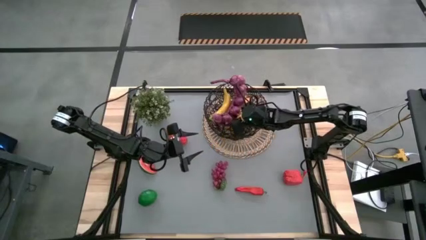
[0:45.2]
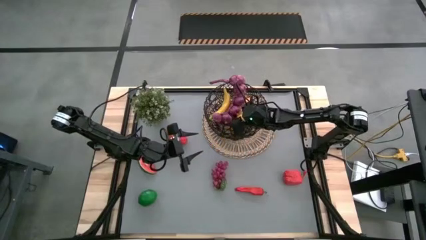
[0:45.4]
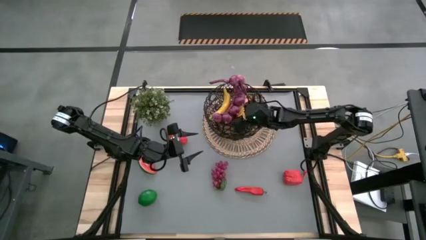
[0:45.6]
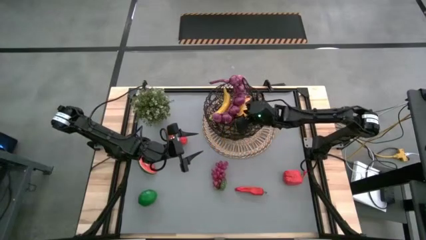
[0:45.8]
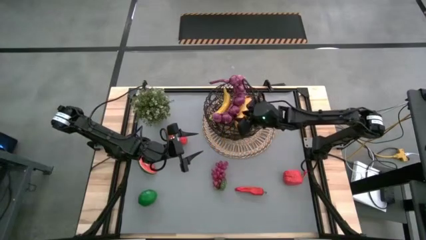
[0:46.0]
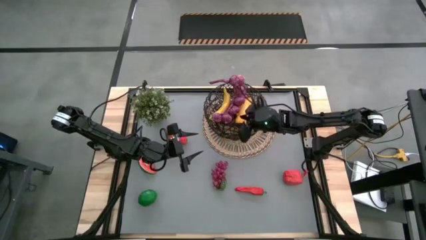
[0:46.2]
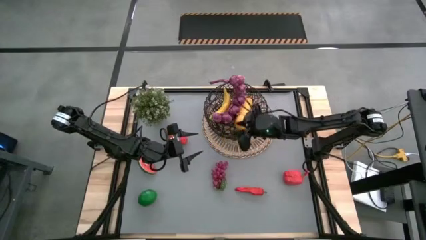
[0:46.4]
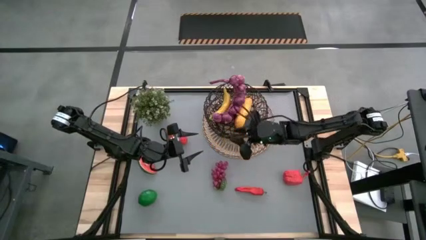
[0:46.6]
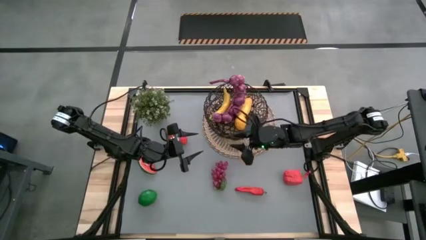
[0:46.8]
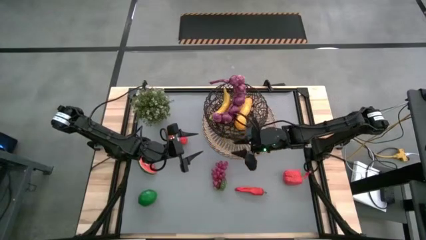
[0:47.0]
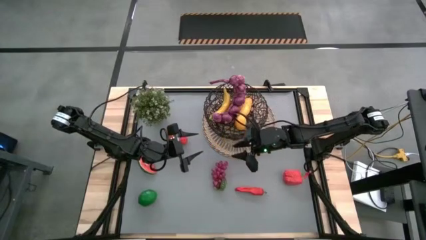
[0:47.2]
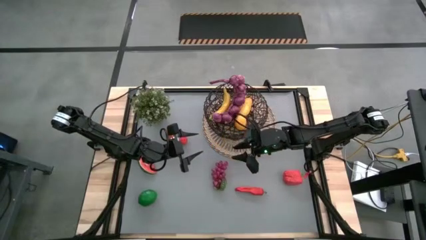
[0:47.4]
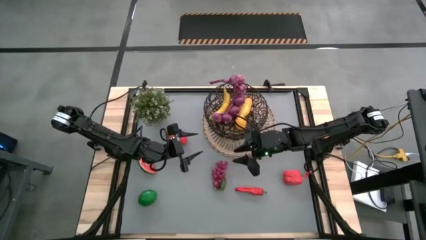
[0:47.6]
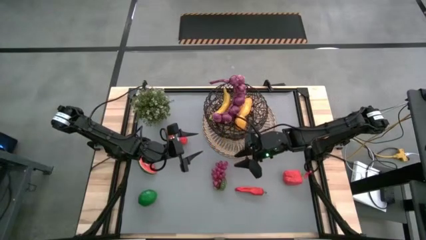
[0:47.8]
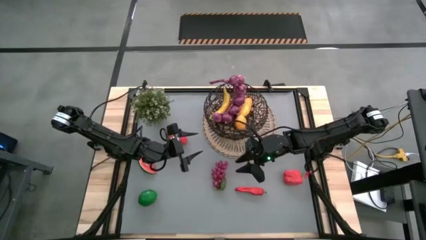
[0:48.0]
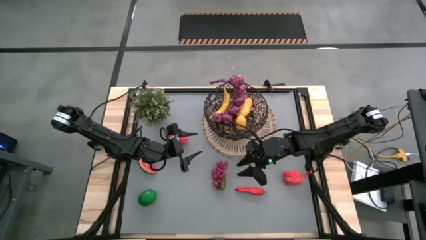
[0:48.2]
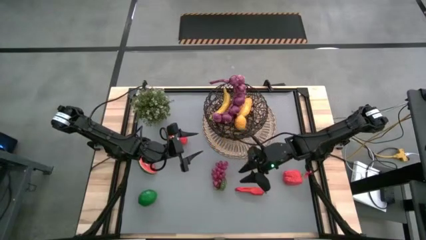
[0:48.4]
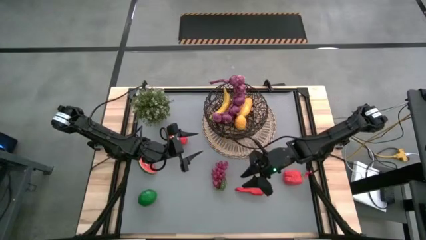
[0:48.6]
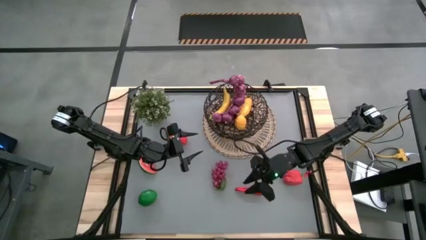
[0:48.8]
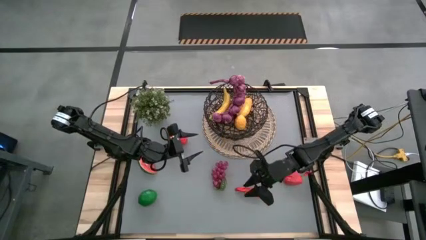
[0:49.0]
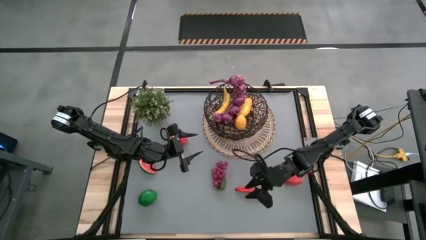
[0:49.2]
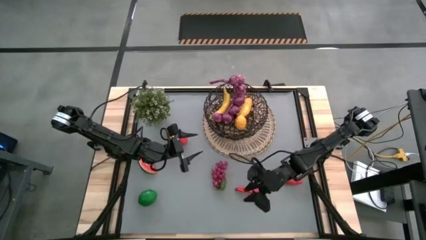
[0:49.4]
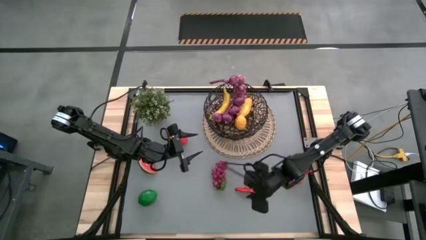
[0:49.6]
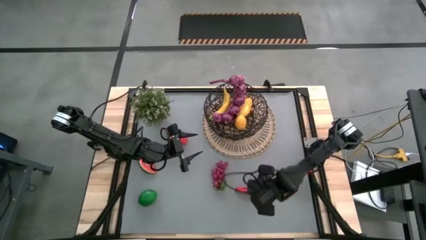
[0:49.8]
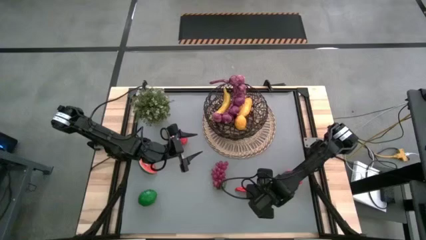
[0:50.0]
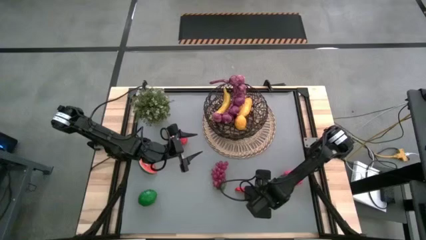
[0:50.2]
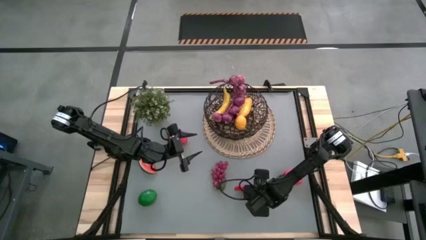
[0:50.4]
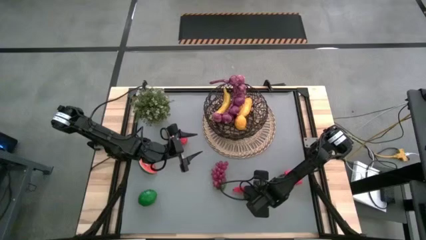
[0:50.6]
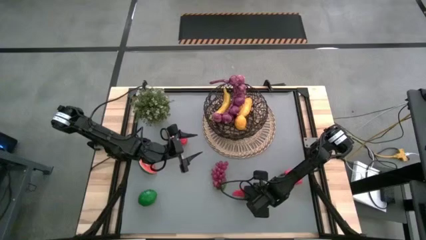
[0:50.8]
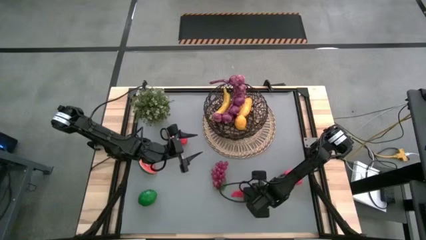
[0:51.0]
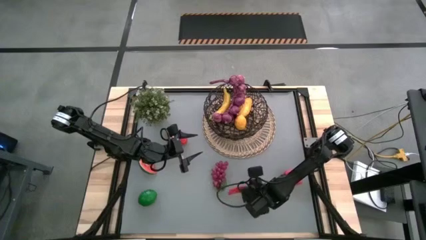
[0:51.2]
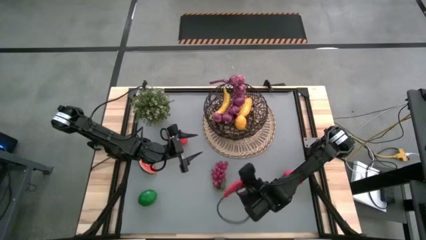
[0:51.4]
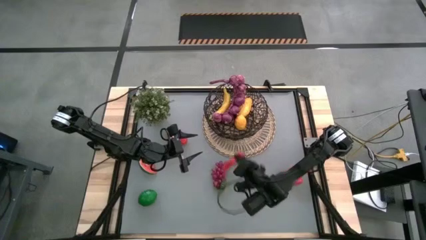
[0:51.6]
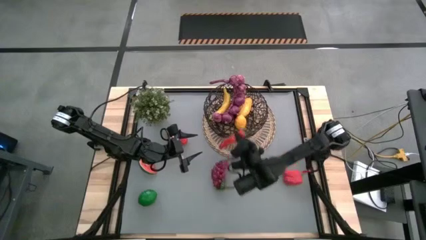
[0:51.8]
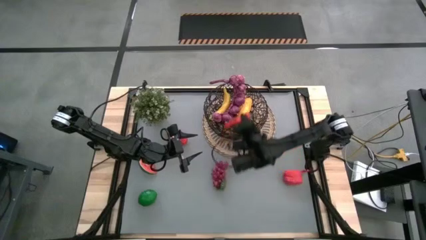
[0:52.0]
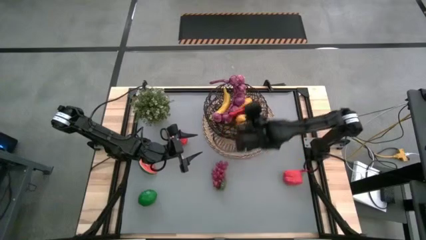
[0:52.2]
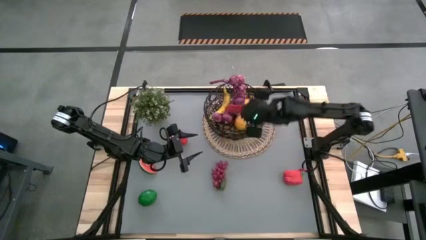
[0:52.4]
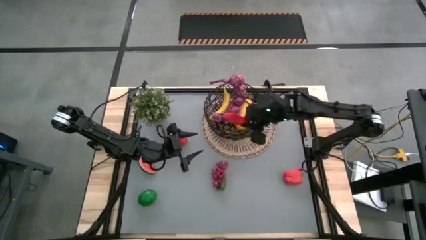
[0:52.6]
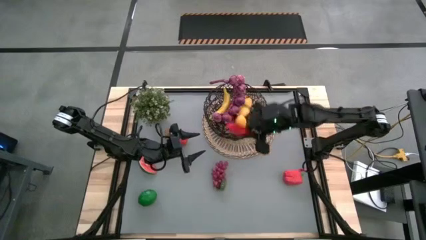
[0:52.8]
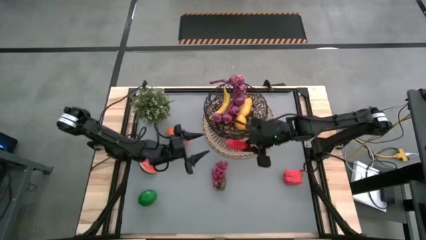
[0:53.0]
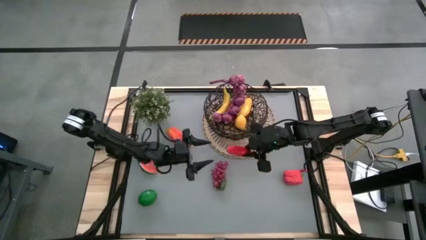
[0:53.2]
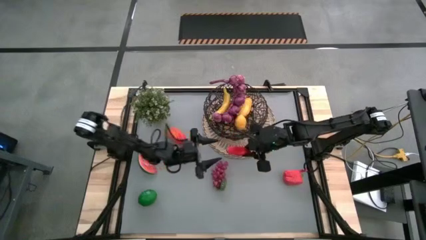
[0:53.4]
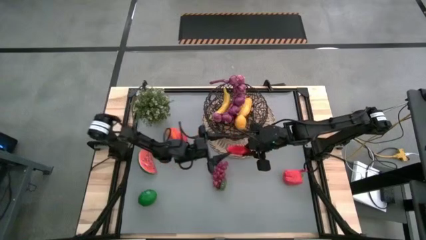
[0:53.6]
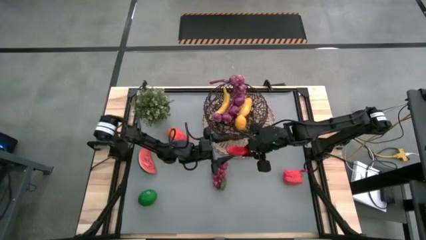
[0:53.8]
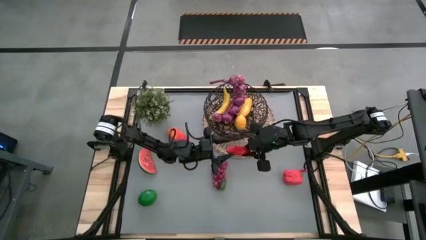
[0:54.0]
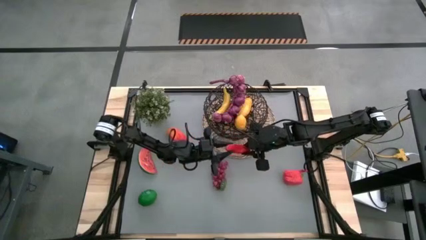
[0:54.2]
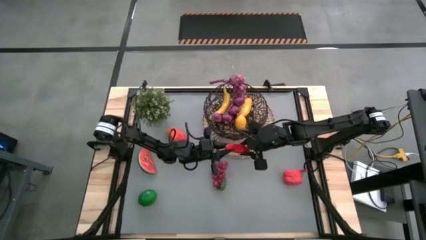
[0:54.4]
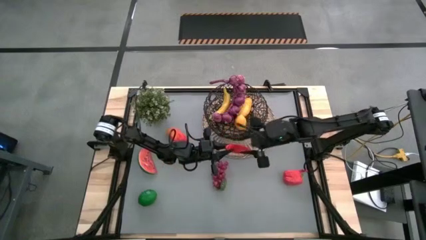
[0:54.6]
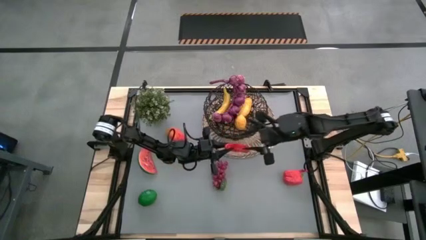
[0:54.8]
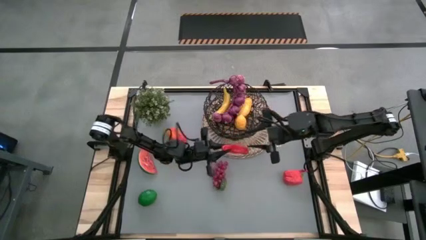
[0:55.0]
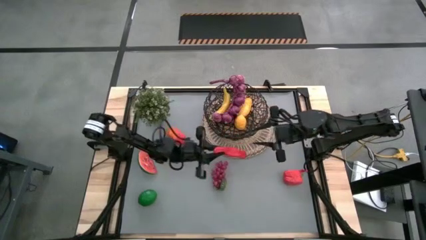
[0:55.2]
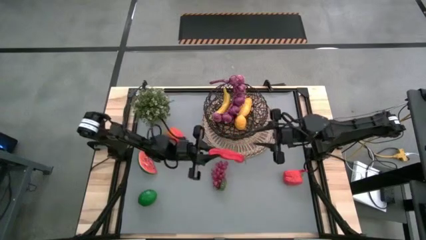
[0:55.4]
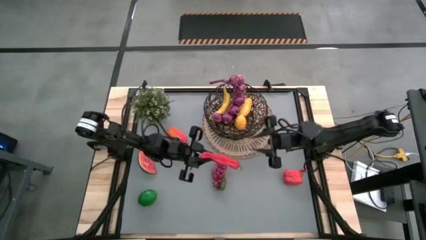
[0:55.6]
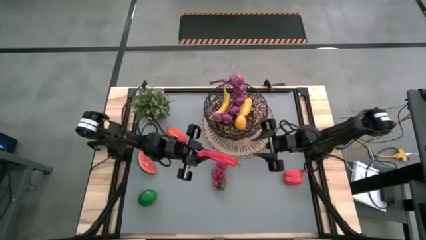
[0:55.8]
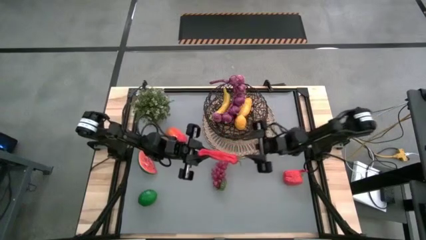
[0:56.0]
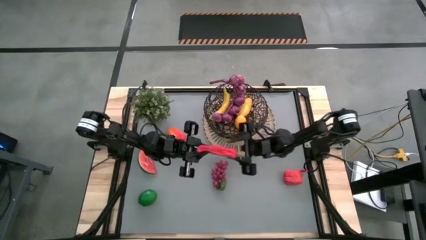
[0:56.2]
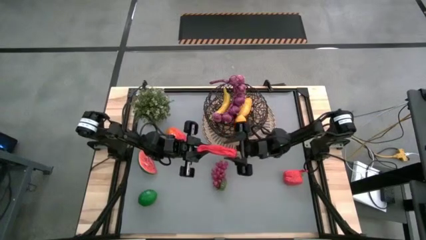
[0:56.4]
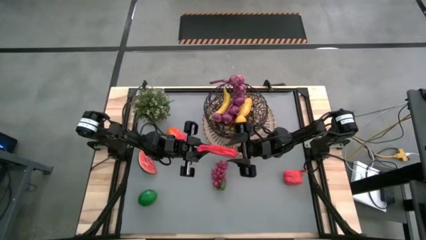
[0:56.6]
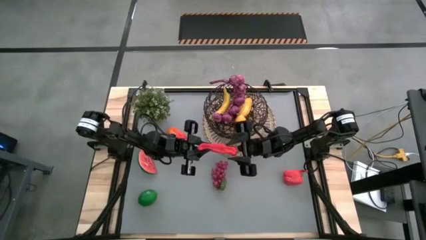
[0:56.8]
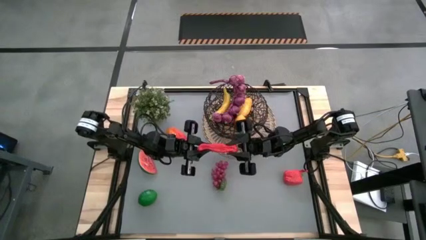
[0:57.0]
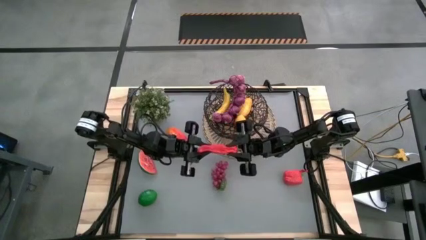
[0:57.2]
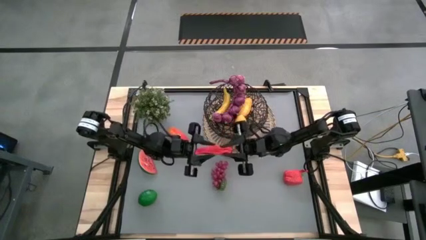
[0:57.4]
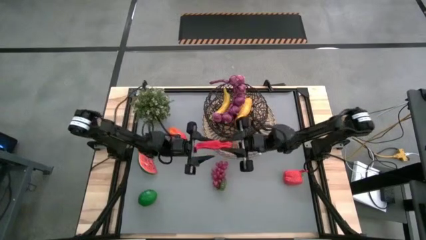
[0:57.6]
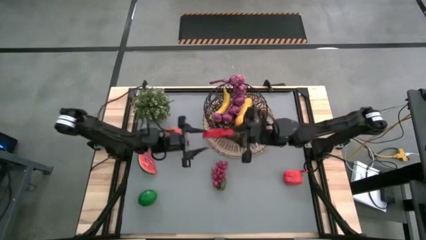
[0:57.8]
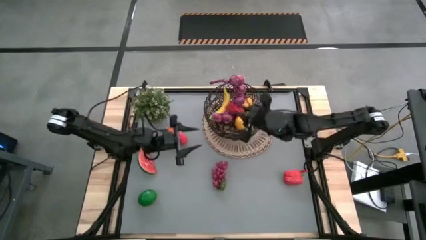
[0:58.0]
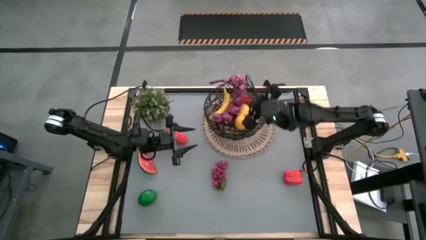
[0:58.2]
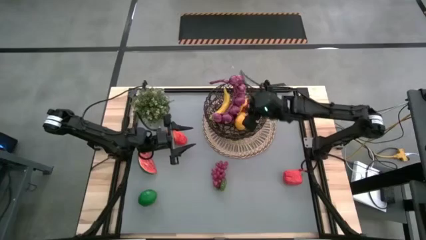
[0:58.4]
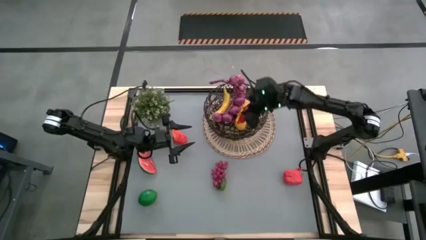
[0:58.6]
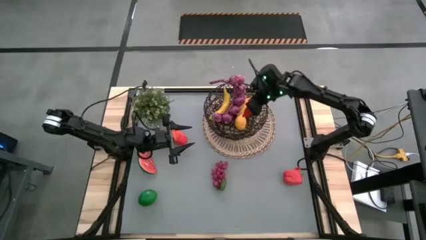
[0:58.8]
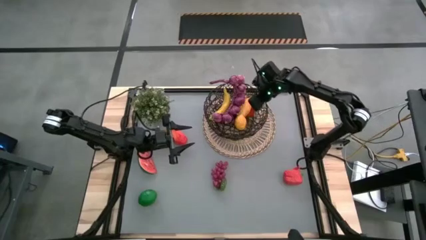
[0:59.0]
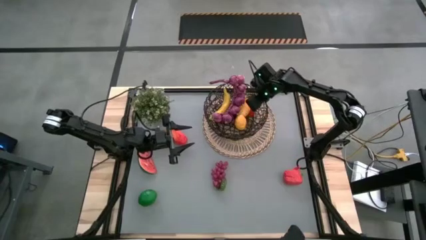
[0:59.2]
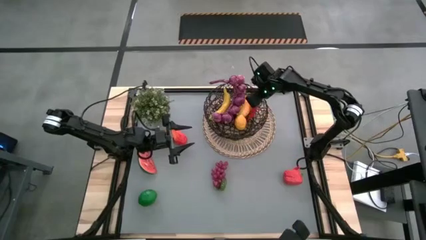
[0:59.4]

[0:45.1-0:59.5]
Task: Build produce basket
Put the chili pepper into the black wire basket

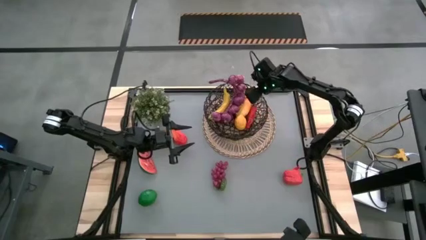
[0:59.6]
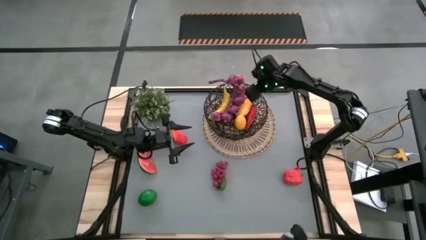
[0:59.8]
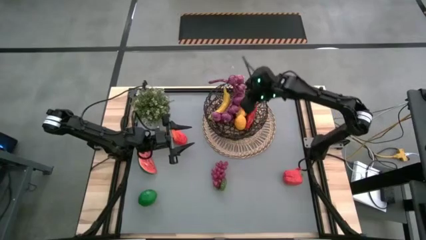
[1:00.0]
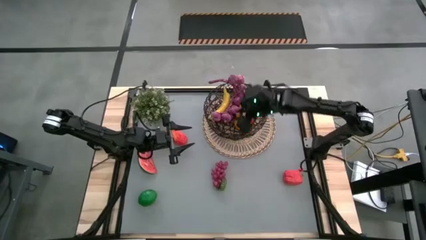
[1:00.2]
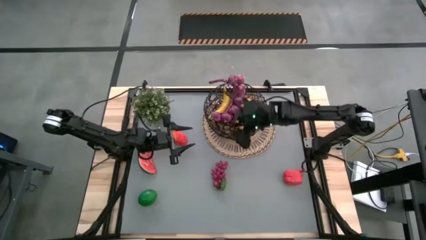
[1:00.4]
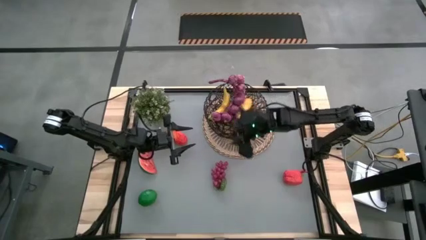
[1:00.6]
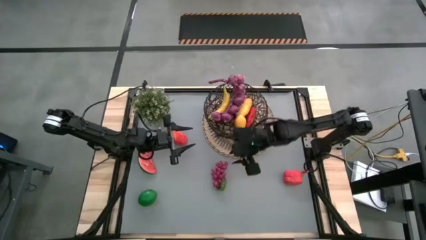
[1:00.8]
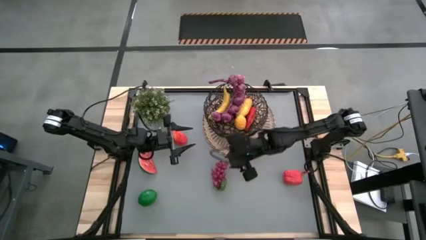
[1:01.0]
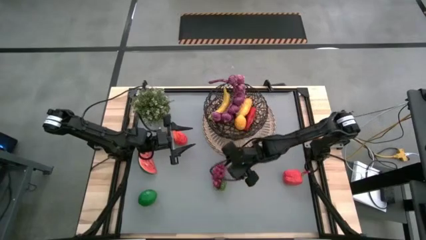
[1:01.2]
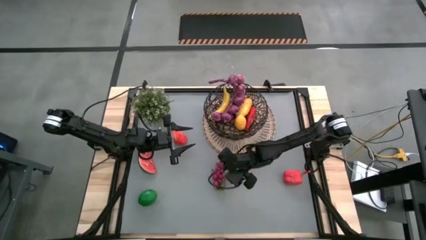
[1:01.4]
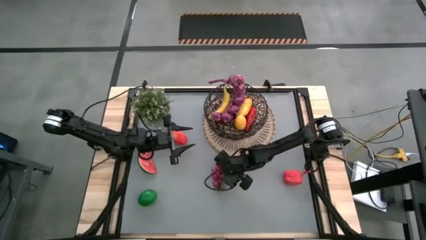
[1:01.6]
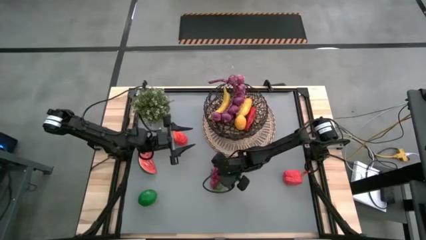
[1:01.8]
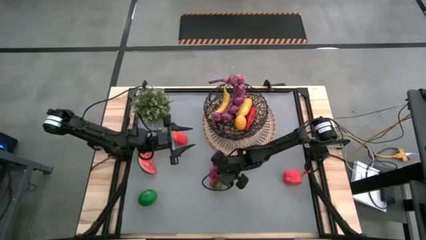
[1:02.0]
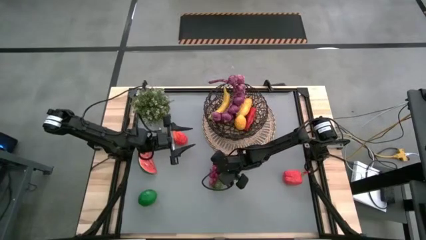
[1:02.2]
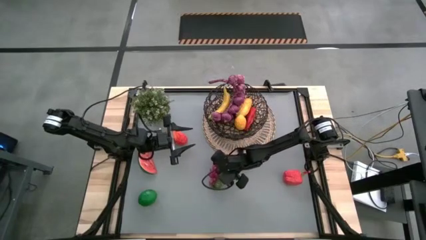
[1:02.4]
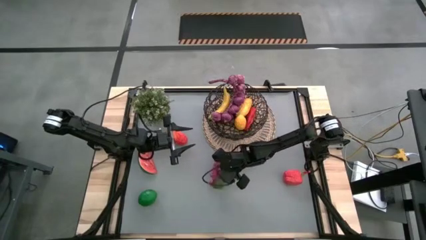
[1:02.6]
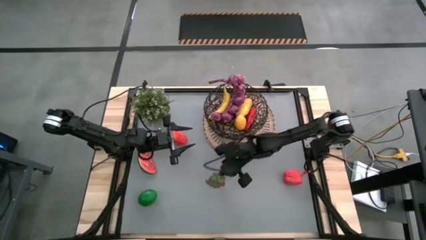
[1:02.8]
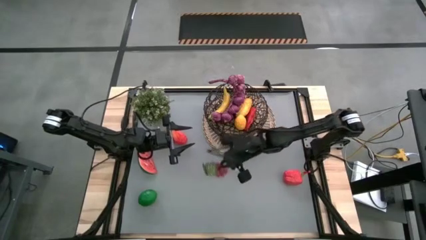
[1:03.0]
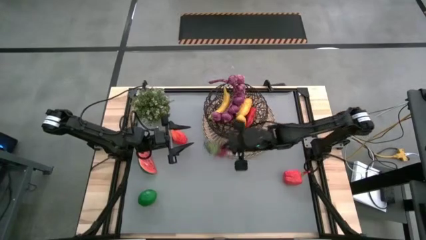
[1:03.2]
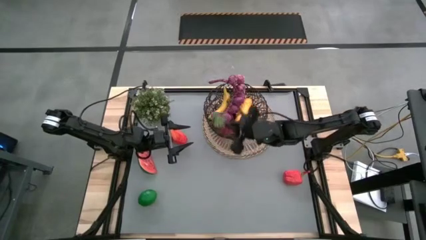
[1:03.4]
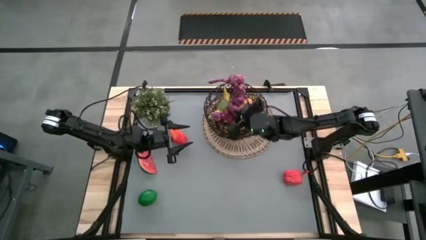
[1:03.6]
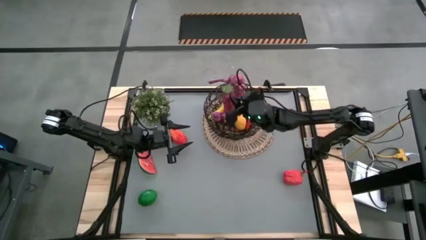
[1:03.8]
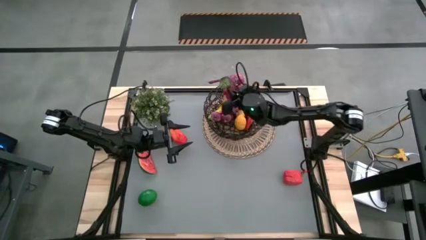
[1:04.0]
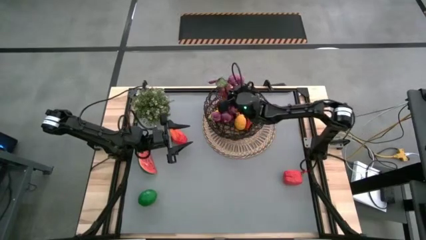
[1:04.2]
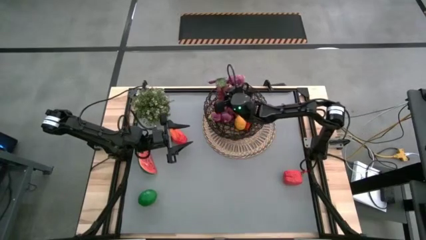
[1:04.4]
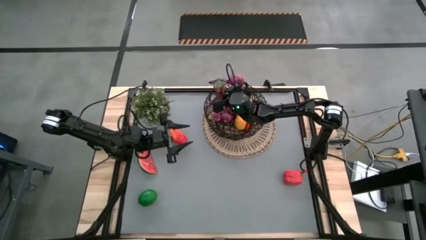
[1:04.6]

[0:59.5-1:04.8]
Put the grapes into the black wire basket
